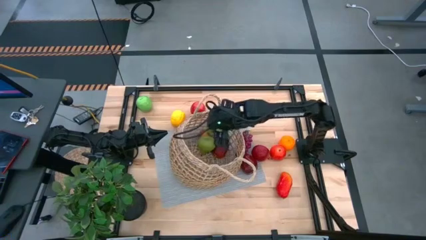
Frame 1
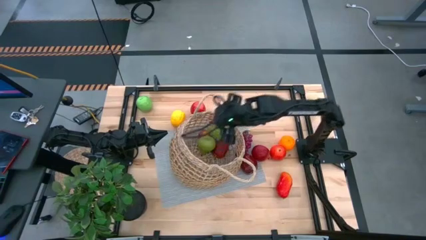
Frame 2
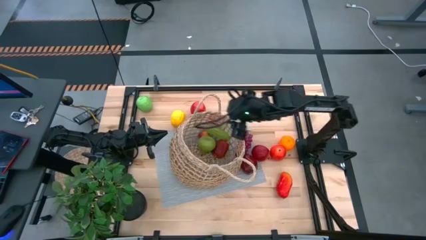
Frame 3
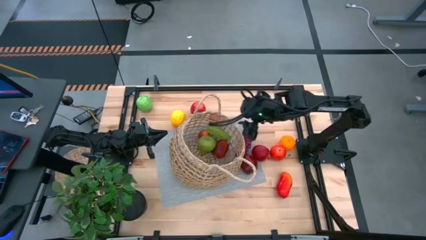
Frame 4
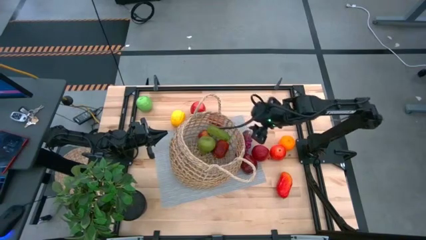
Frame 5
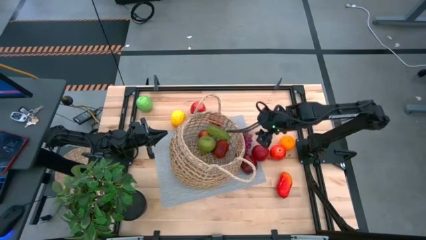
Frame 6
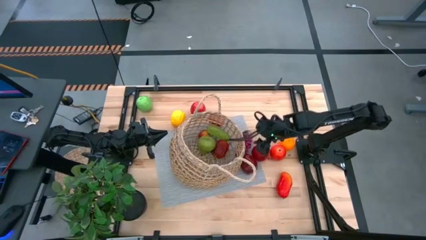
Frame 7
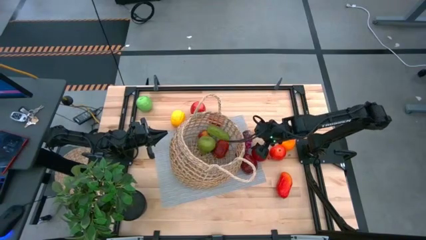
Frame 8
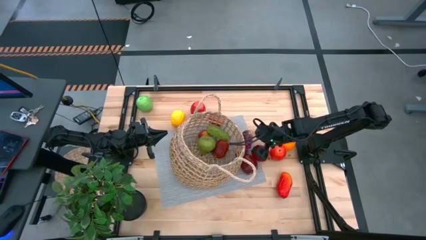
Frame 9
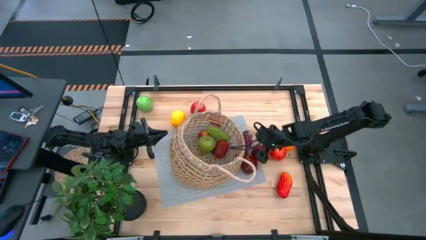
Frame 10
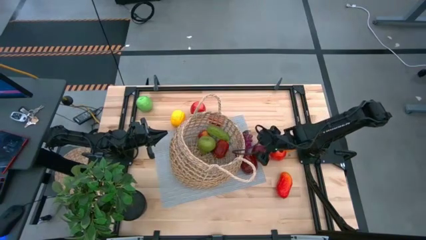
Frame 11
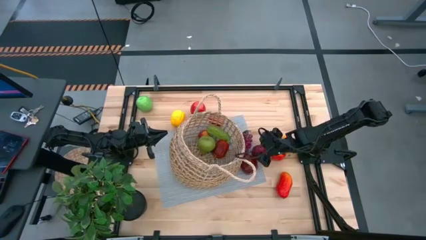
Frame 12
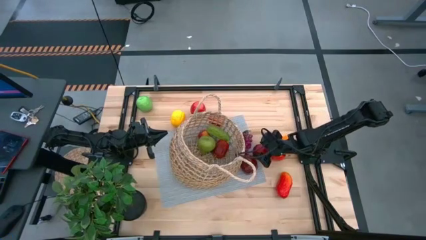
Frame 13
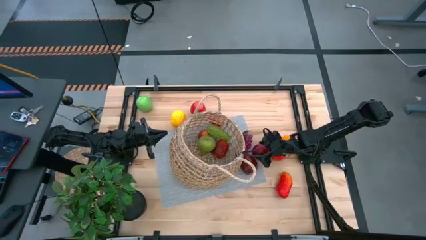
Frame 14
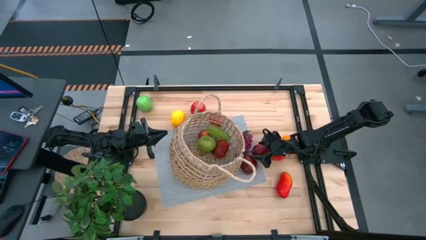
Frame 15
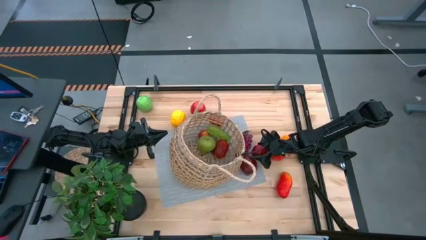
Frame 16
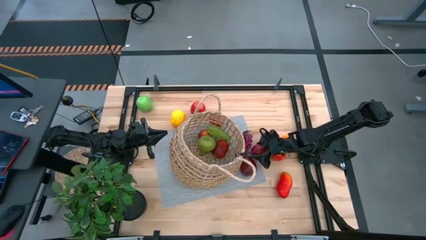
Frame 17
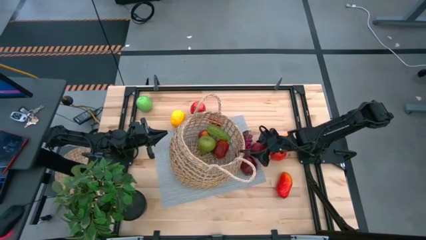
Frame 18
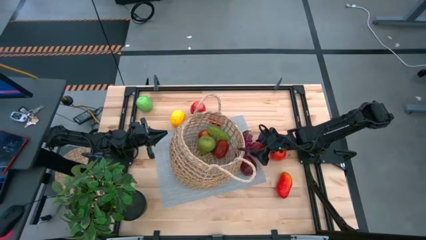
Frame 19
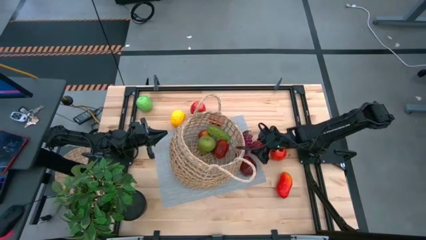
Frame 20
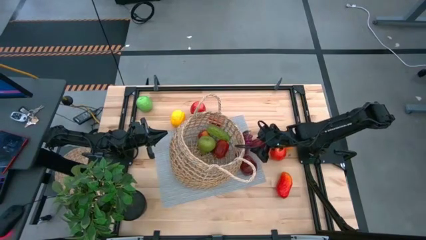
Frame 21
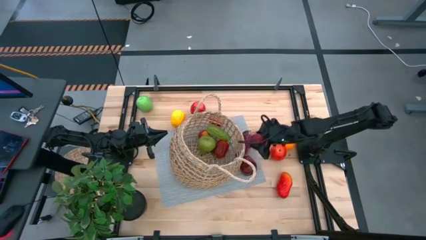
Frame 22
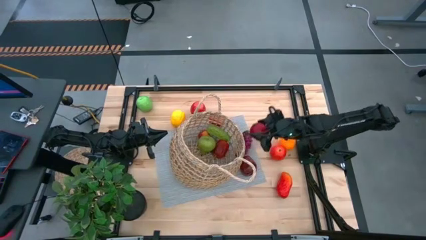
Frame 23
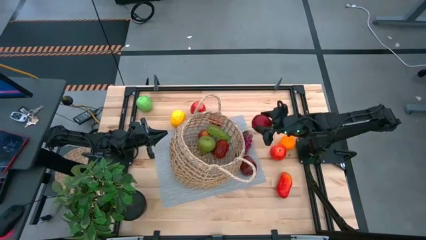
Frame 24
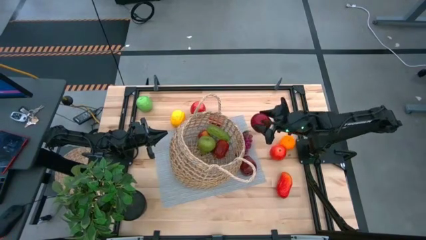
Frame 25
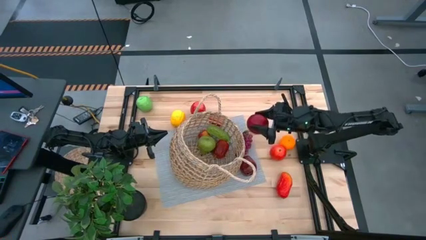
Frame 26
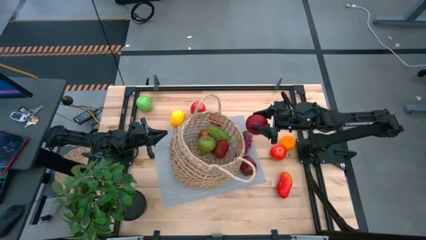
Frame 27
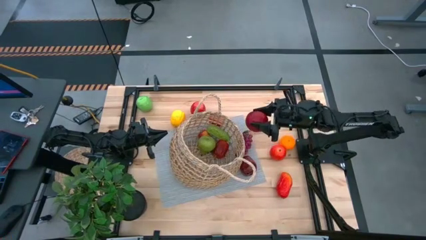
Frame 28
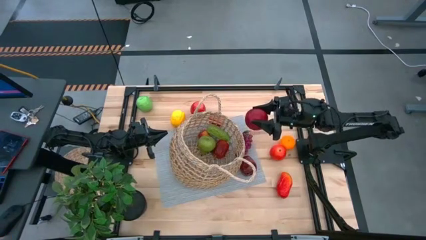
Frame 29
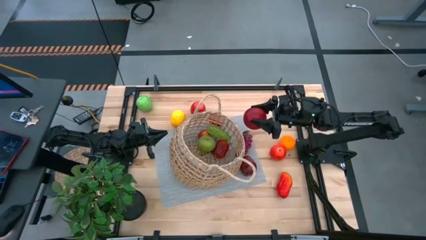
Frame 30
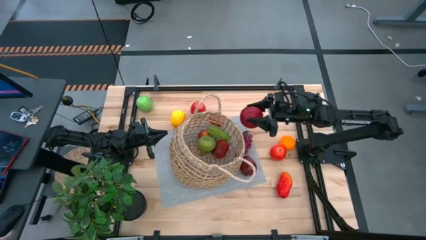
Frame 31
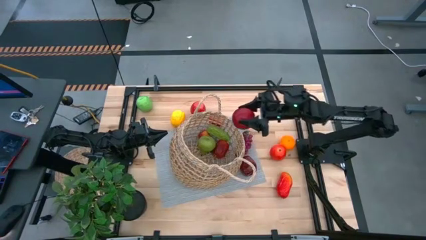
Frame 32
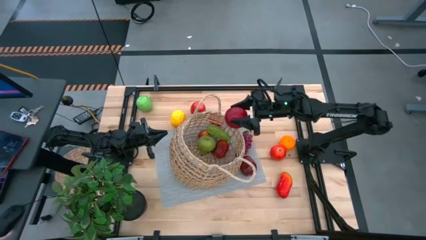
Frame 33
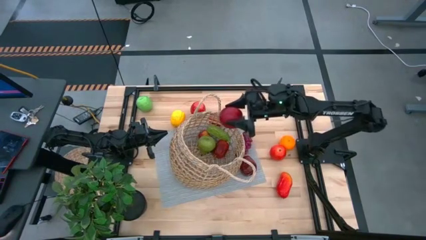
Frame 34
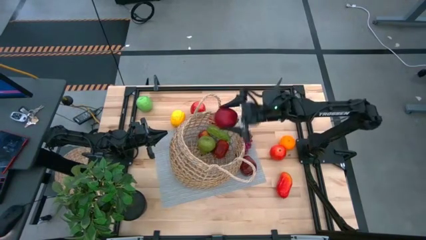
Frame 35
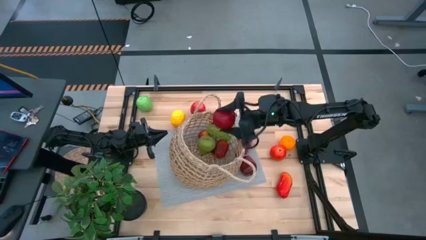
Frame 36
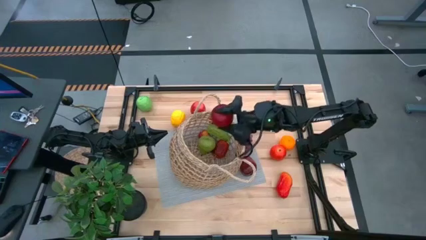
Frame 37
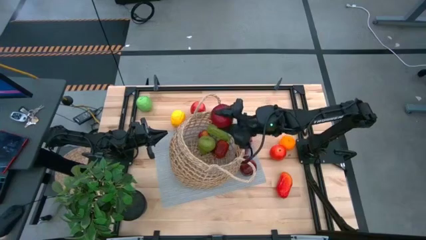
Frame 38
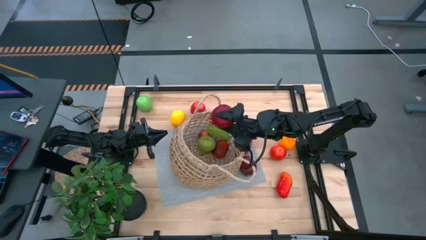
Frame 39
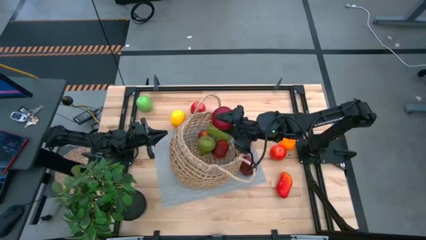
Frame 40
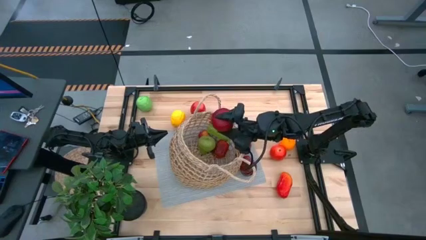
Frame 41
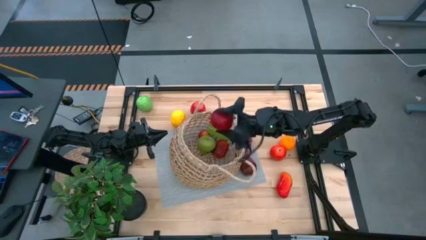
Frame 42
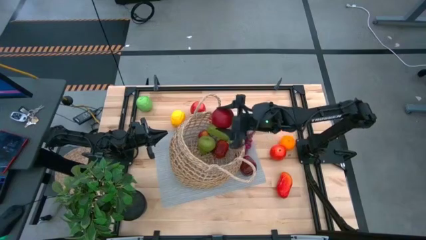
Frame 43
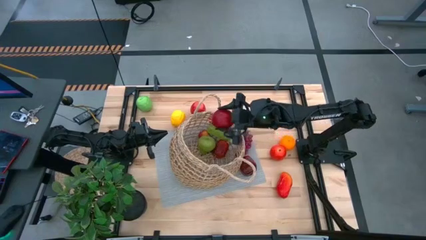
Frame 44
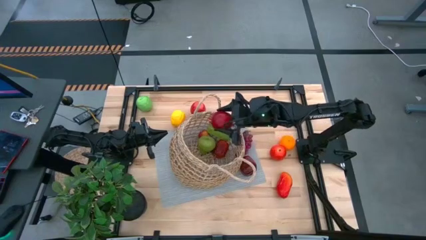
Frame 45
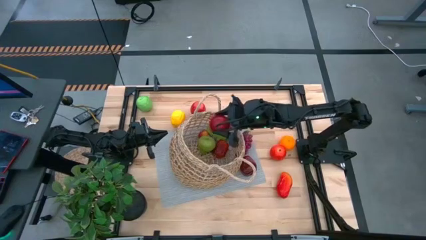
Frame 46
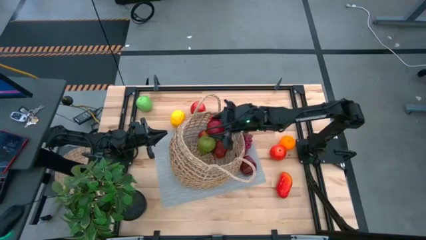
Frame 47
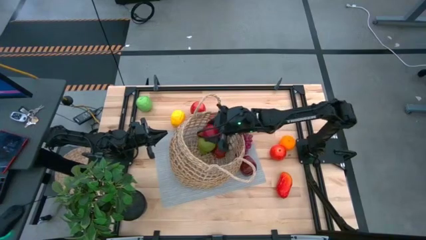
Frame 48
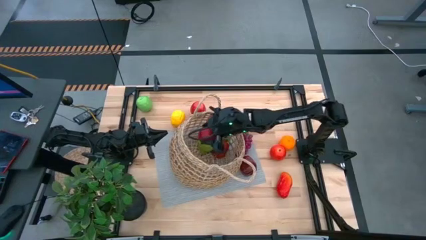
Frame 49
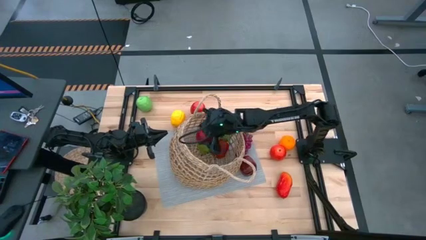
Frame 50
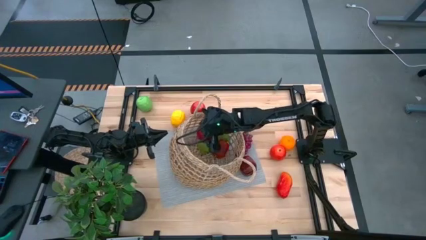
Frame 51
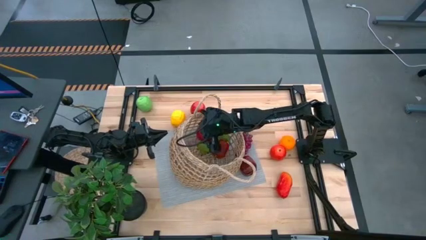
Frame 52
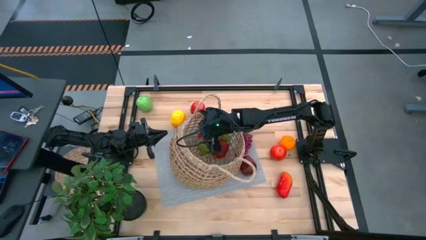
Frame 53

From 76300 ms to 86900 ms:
Task: Build produce basket
Put the pomegranate into the basket

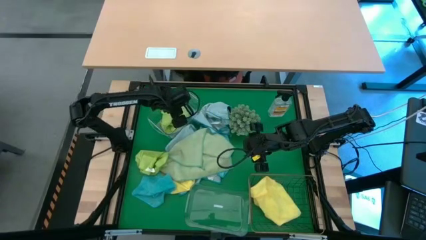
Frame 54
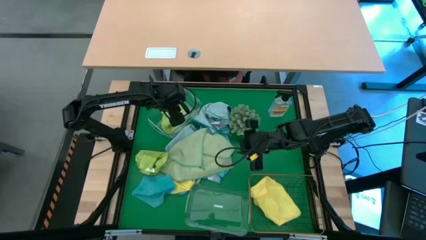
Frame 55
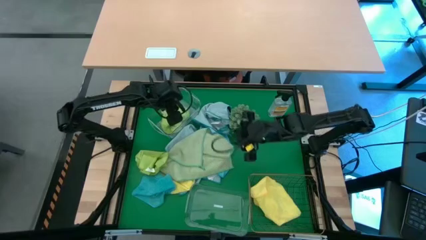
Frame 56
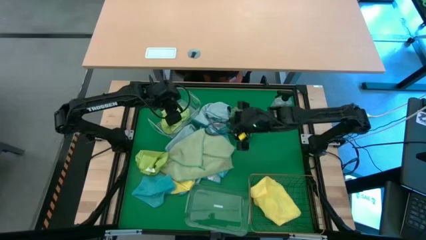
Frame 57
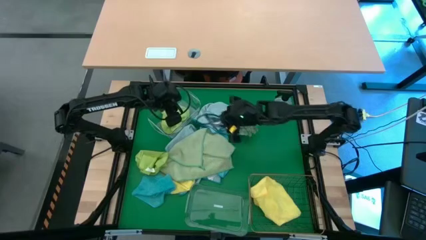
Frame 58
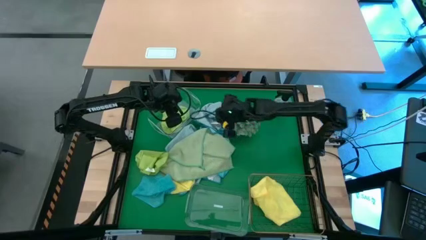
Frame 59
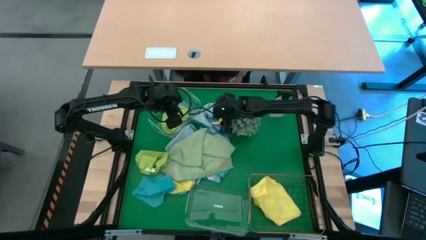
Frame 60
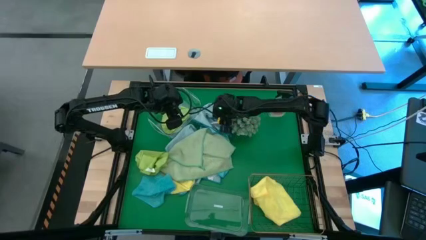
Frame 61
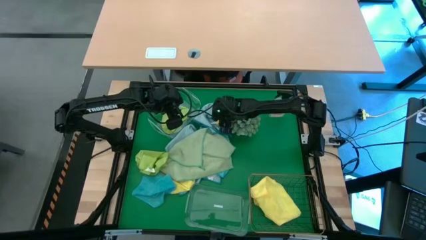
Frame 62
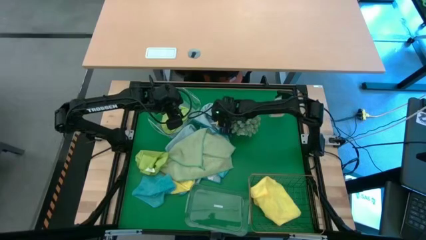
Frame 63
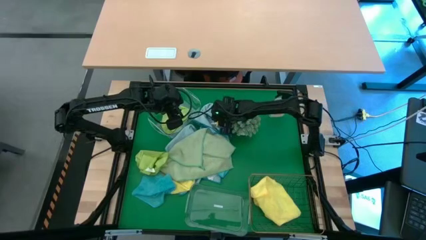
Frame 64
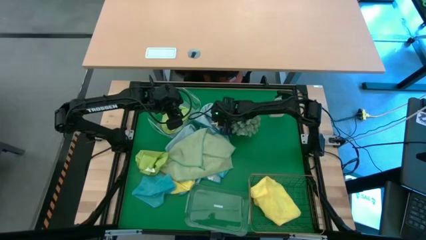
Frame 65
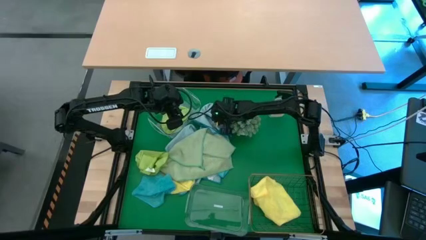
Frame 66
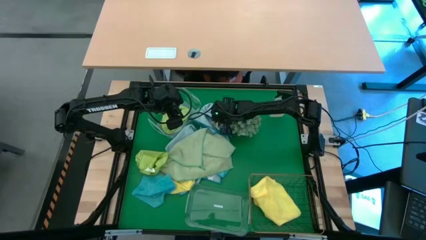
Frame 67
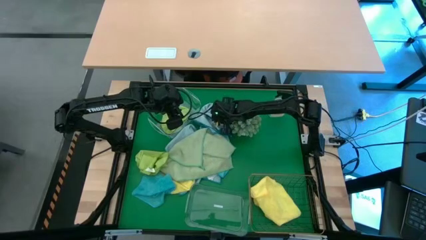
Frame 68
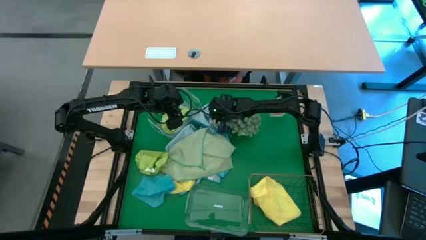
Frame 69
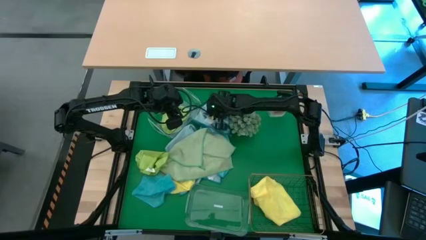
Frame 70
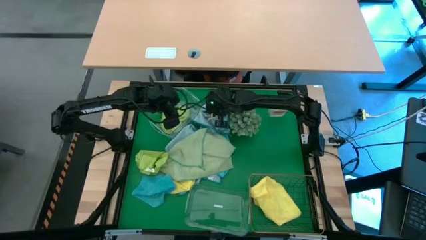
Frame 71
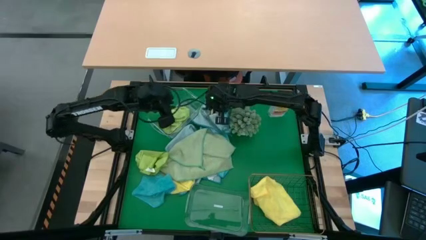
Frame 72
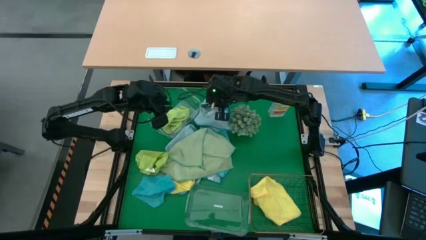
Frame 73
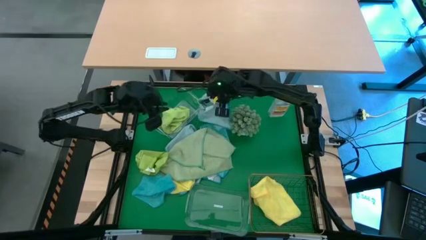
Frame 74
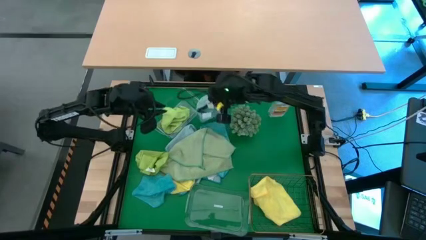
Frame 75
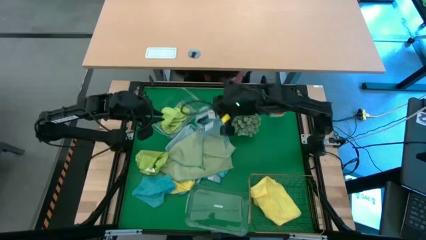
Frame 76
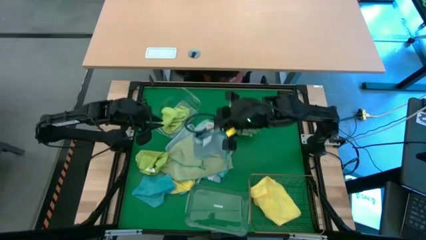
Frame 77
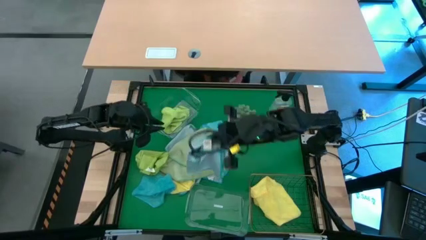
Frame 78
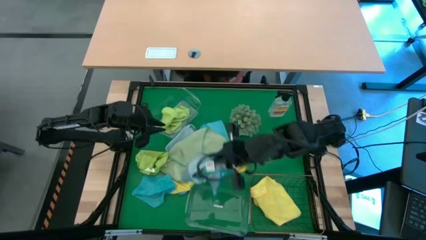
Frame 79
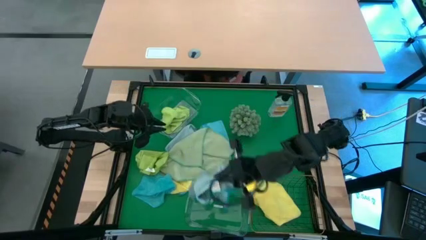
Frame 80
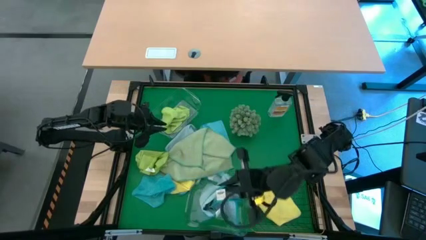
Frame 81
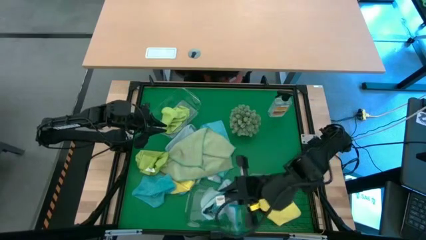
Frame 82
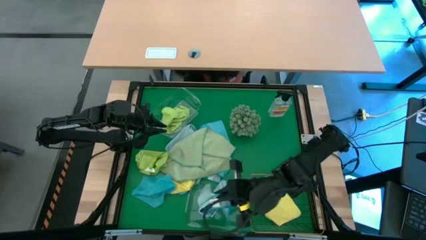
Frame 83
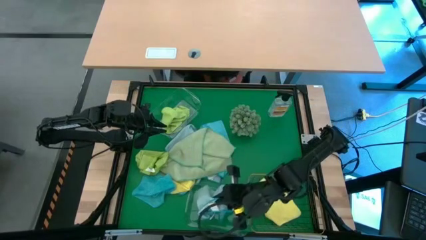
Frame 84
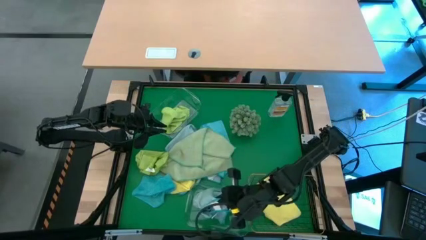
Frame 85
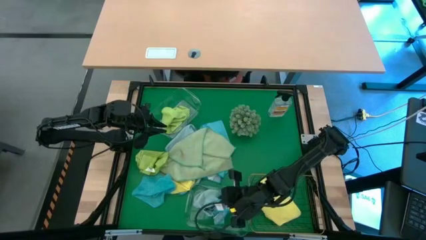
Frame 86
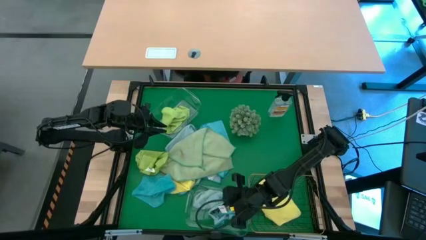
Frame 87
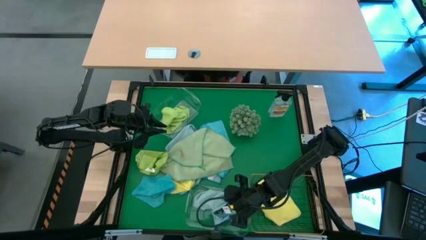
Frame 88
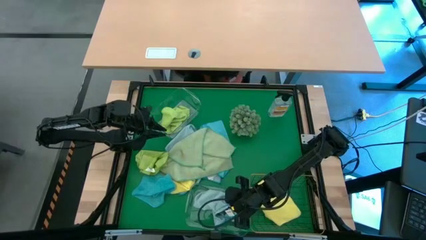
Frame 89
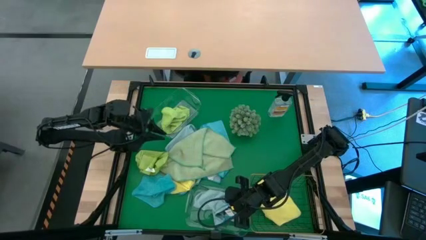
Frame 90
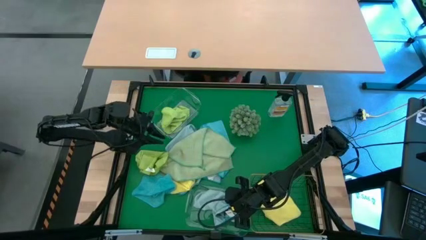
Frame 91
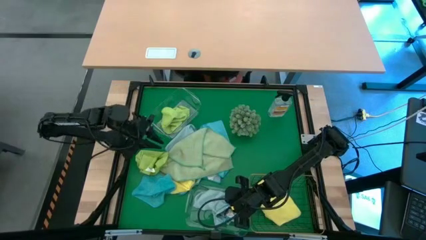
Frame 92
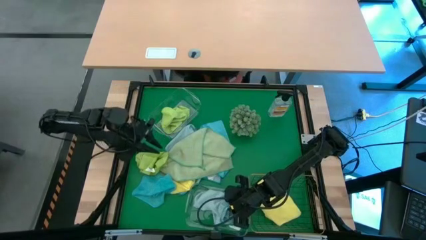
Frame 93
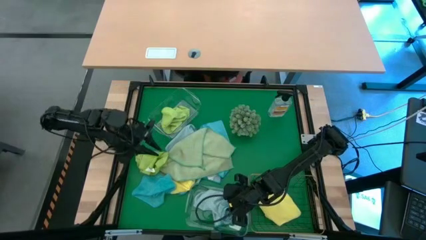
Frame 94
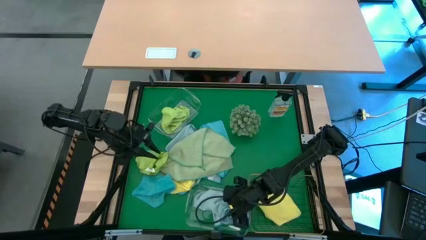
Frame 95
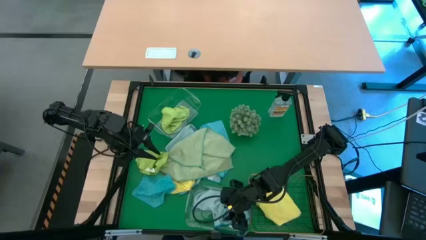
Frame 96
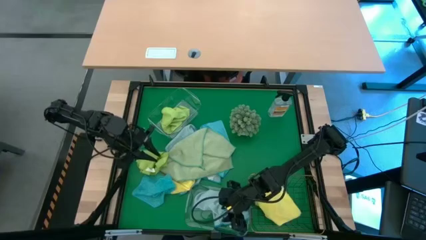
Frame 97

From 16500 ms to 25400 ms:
Task: Sort microfiber towel by color & place in baskets
Put the light blue microfiber cloth into the bottom transparent bin
